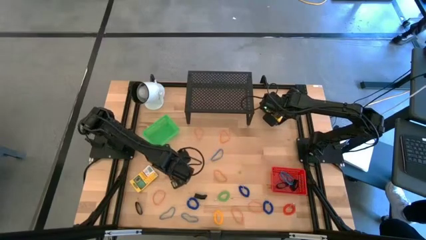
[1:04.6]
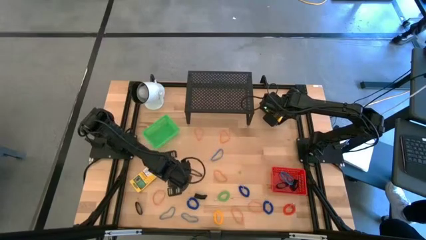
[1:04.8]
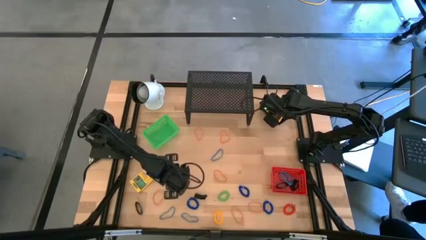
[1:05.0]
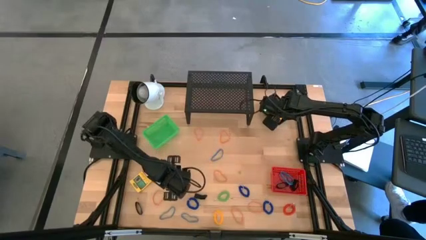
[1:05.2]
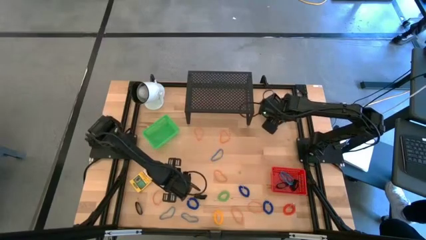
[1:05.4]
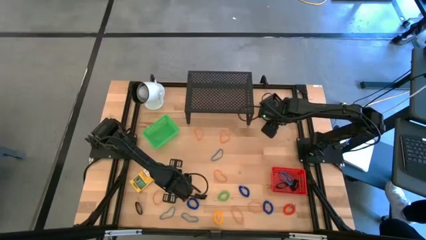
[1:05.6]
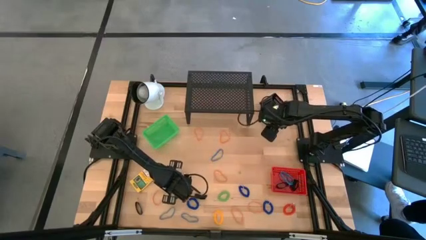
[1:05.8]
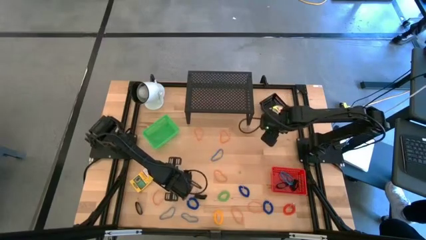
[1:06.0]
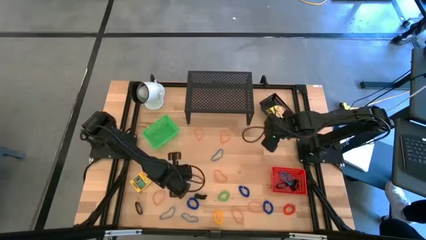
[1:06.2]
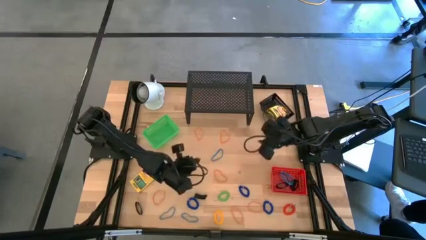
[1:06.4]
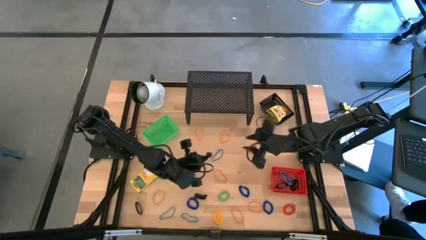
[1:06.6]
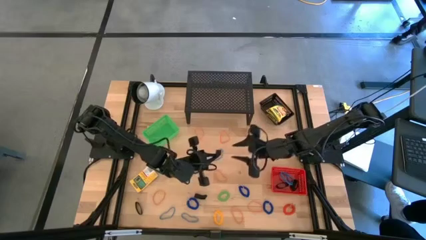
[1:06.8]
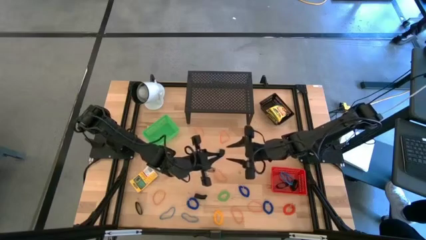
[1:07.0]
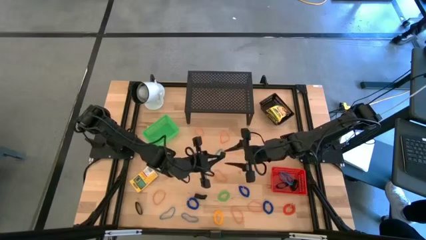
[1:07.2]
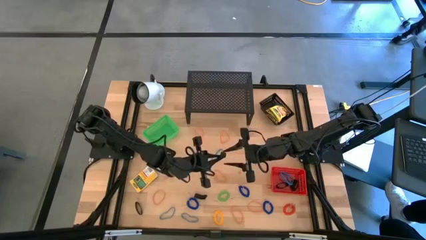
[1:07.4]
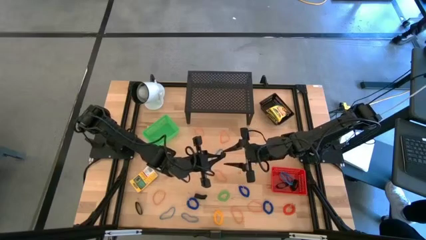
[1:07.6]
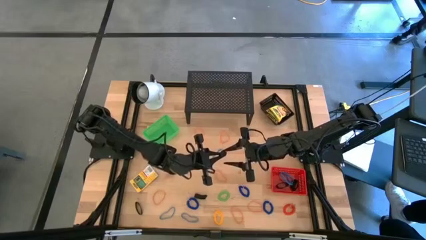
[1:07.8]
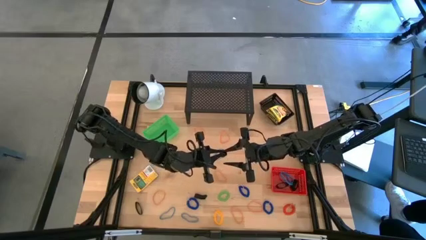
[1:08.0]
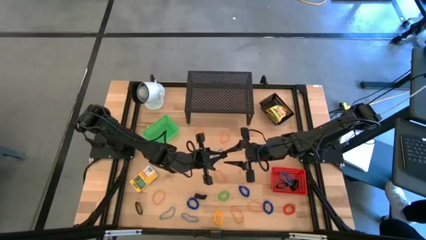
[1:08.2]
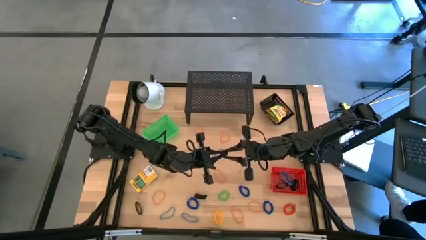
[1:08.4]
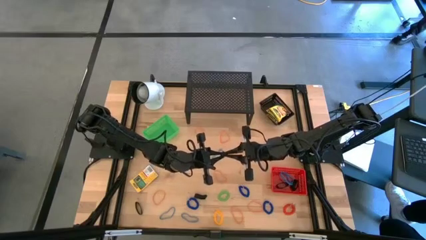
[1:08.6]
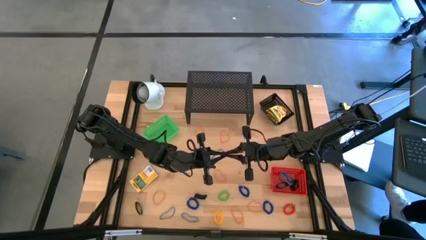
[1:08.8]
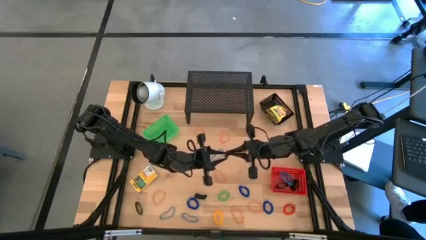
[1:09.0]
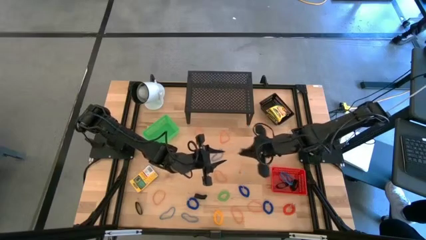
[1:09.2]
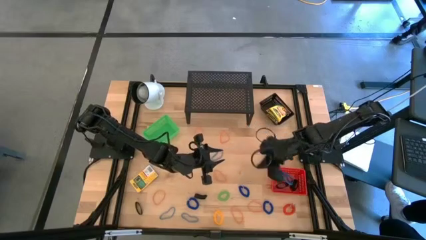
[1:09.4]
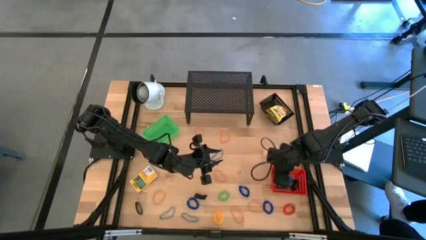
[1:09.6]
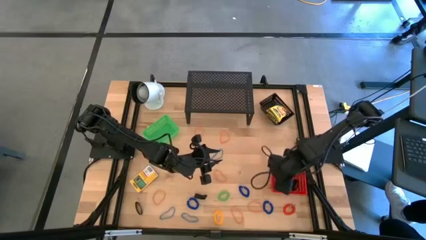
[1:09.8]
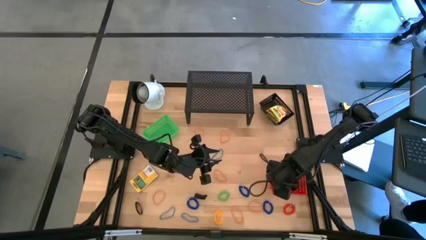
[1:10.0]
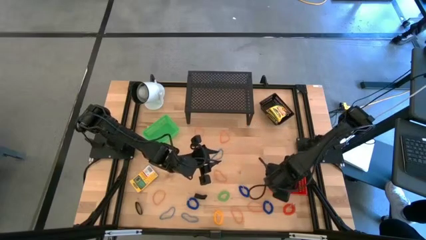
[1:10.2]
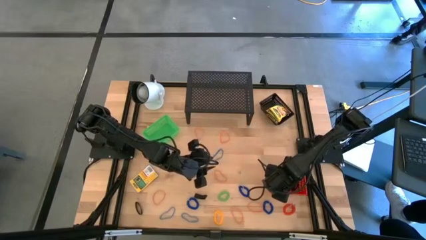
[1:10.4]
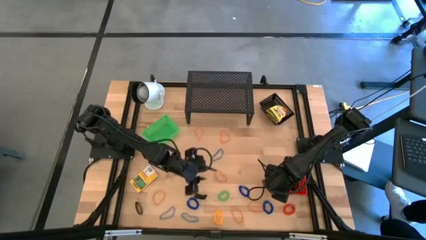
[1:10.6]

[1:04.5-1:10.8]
Task: Pick & Place Office Desk Supplies
Put the top black rubber band into the red bin

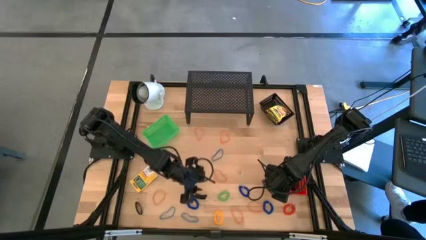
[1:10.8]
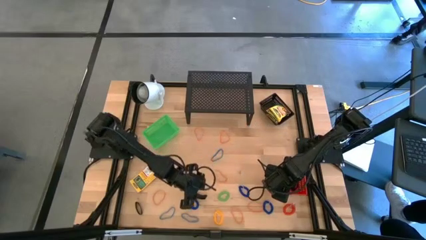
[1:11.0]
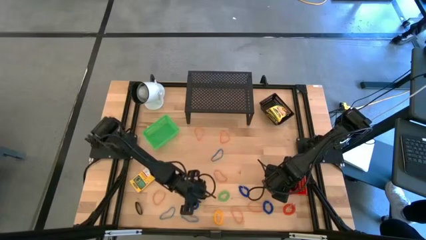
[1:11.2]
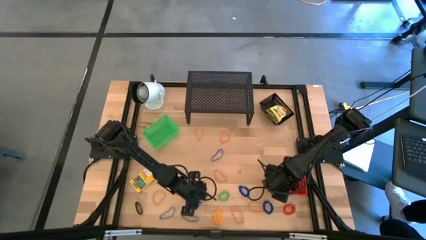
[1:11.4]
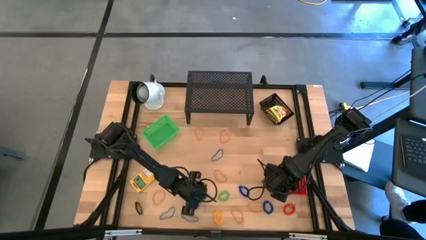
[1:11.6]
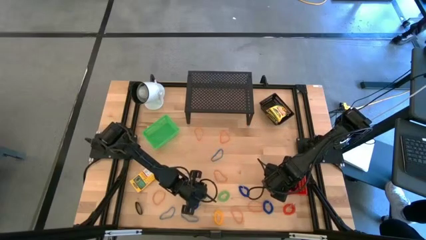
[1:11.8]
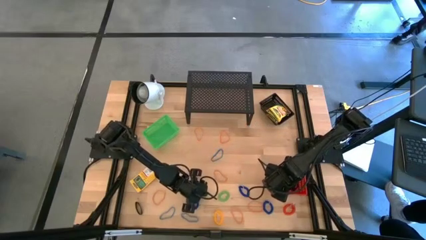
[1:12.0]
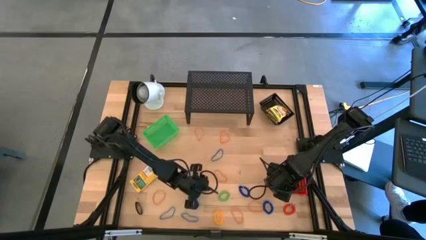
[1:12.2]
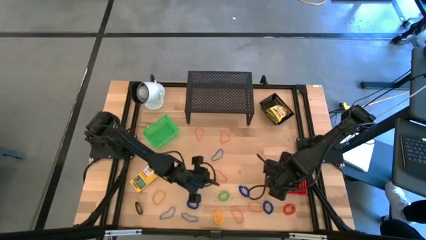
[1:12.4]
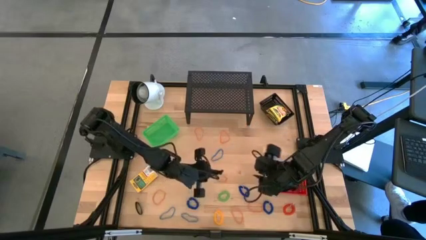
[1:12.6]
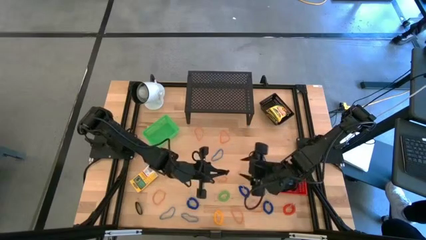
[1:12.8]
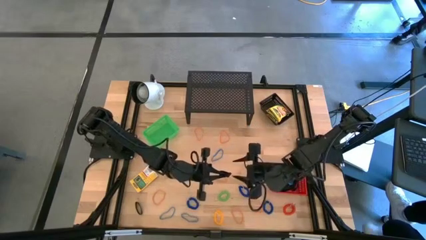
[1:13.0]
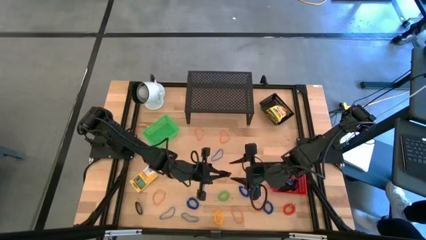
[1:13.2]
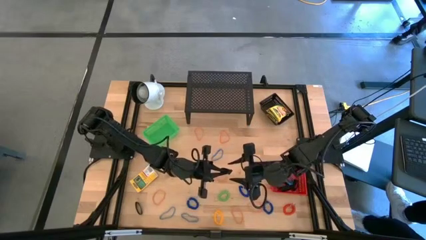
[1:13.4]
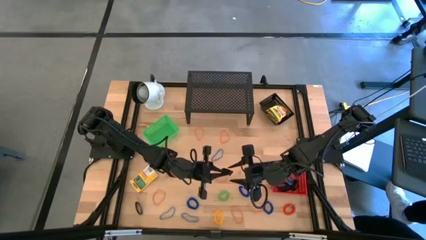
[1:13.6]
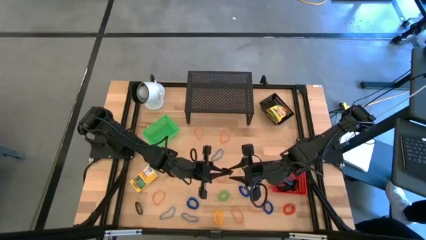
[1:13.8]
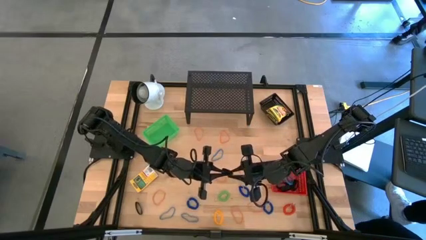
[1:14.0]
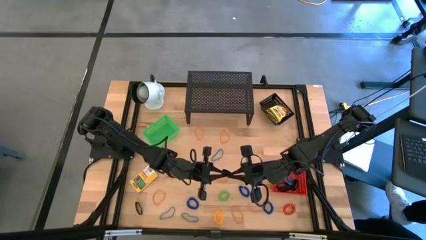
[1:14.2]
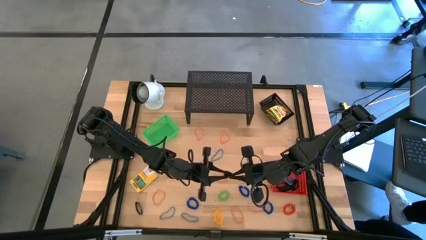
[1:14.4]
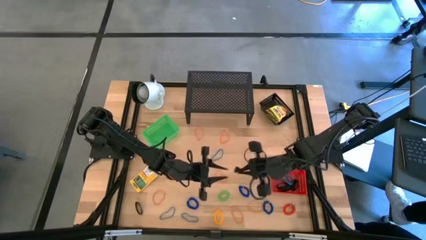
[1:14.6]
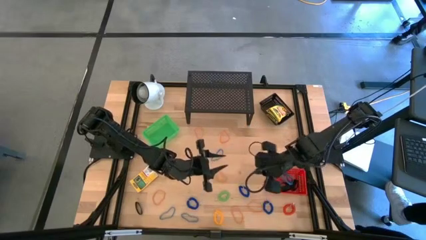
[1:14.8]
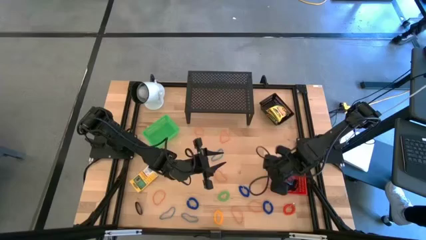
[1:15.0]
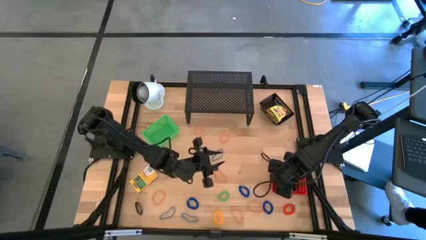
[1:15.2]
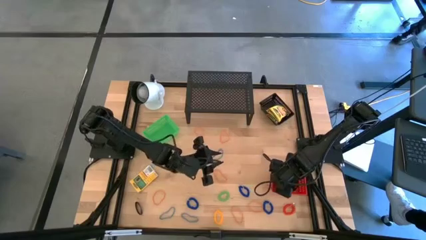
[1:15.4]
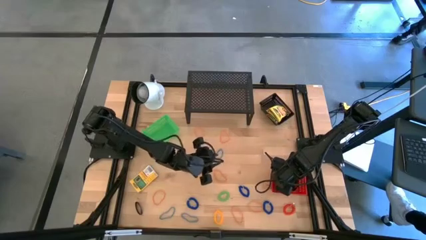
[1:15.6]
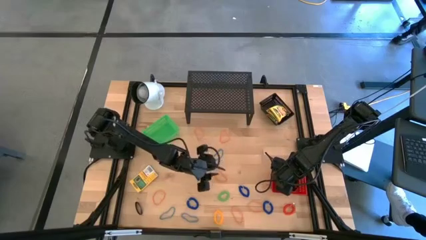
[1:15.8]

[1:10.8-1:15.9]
Put the right black rubber band into the red bin

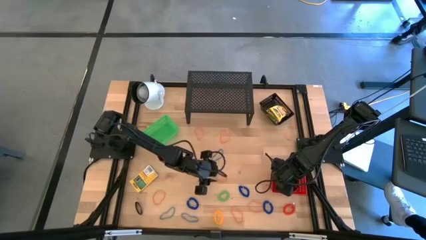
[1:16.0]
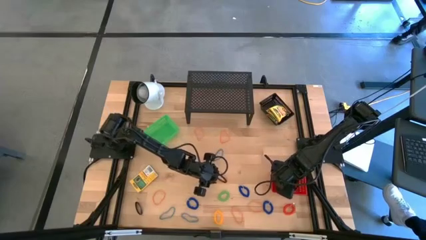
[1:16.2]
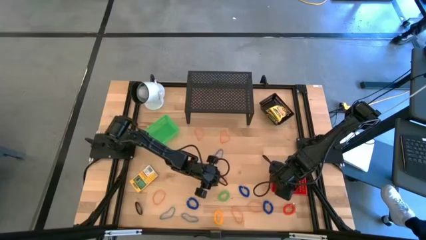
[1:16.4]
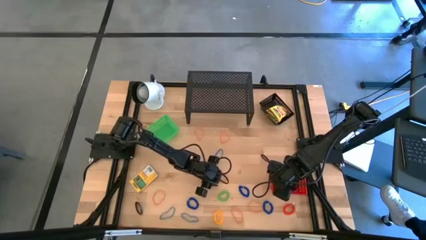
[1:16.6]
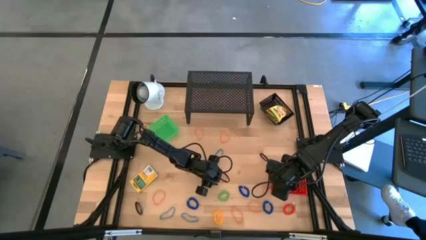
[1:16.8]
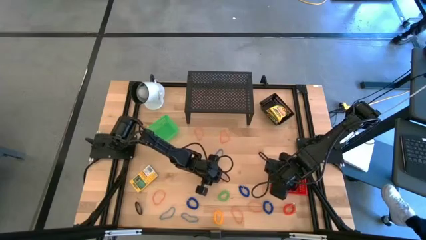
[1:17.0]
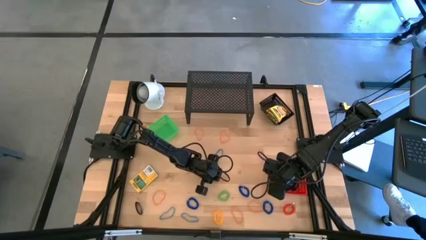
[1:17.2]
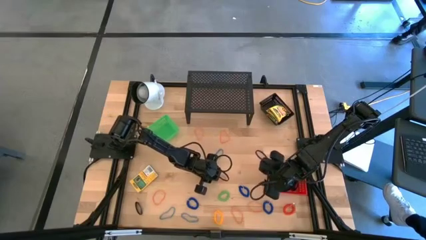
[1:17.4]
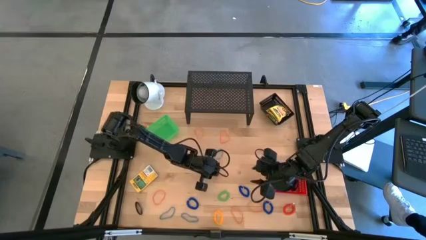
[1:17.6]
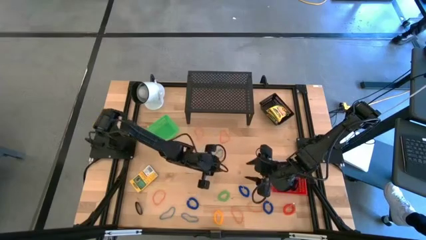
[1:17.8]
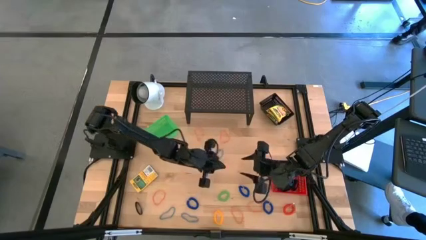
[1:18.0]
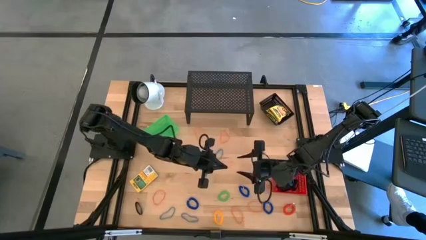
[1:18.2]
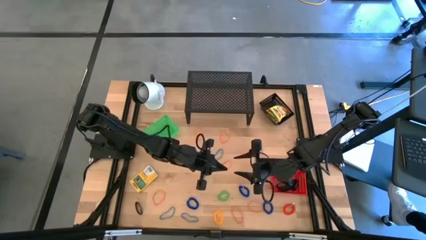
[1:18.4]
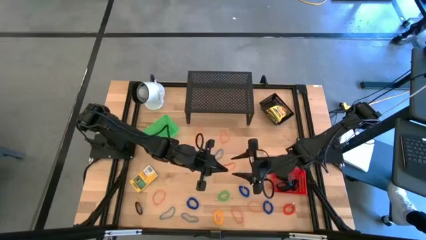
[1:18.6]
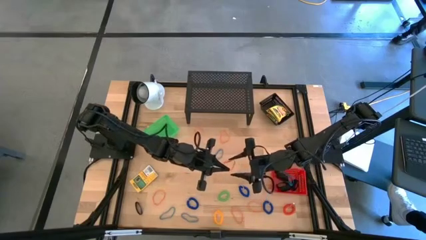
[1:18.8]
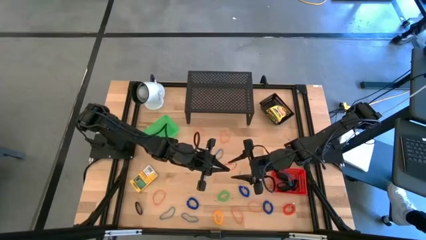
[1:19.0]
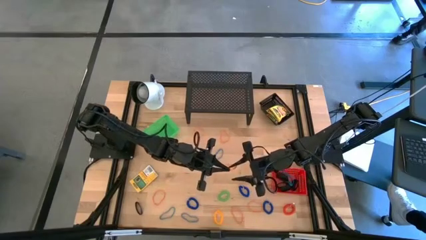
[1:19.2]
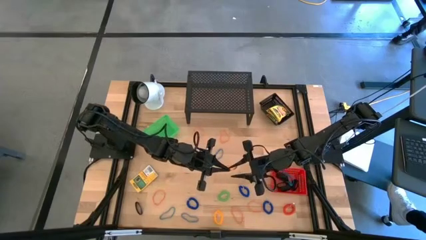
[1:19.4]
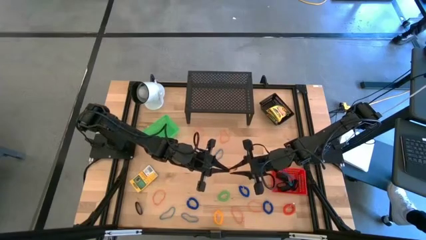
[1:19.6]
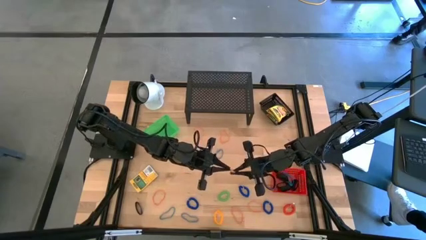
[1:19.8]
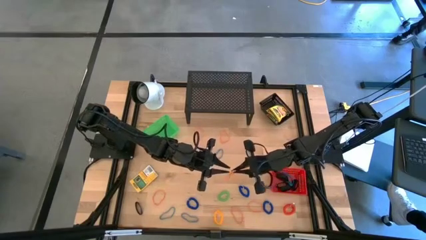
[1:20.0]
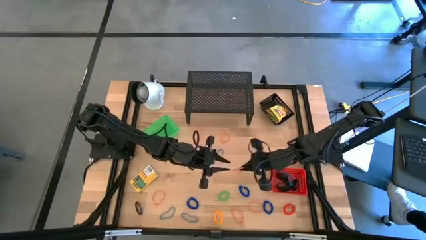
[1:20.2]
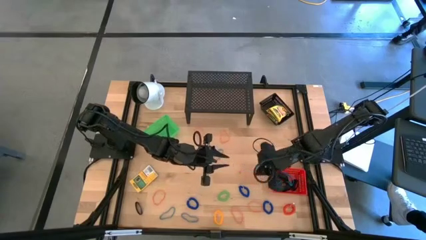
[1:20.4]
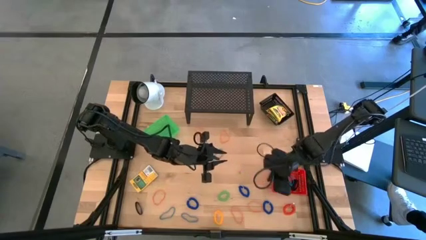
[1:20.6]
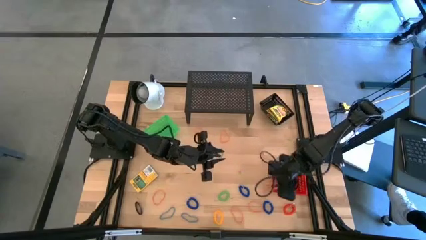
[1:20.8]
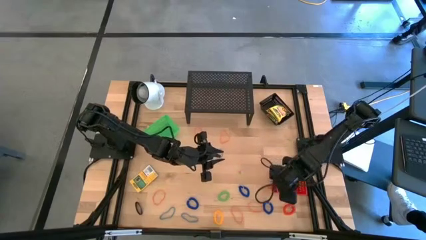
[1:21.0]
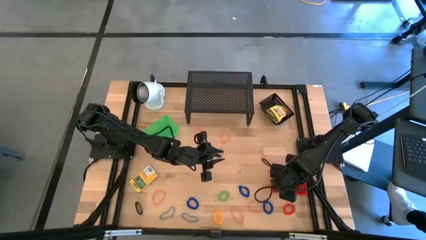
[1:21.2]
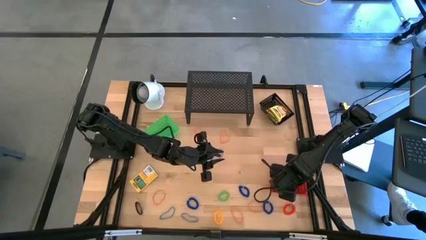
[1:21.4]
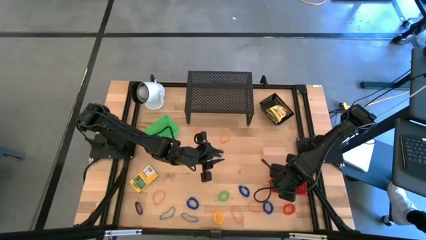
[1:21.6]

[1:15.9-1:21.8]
Put the orange rubber band into the red bin
